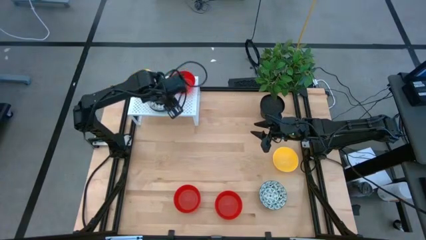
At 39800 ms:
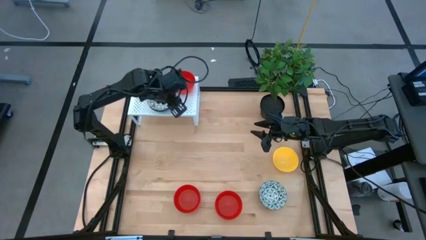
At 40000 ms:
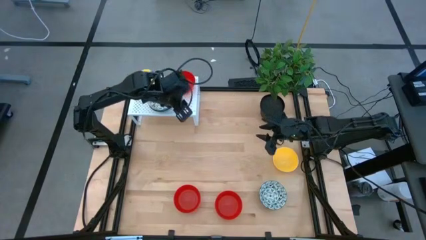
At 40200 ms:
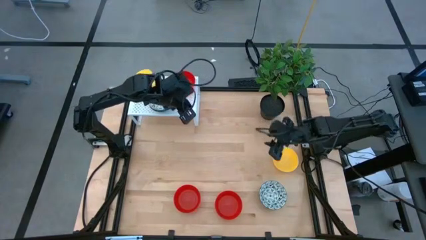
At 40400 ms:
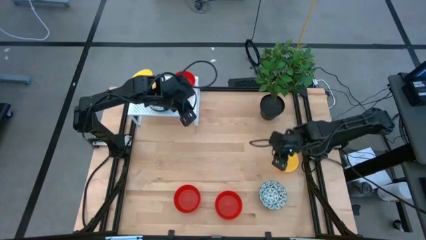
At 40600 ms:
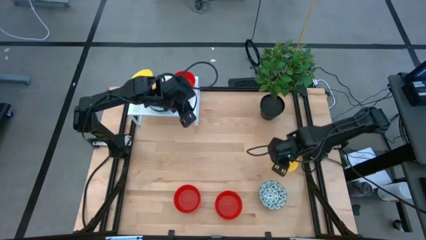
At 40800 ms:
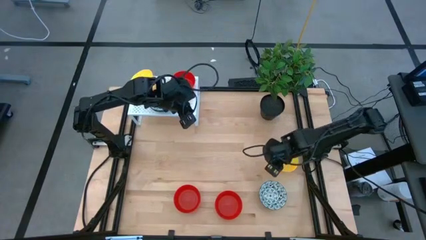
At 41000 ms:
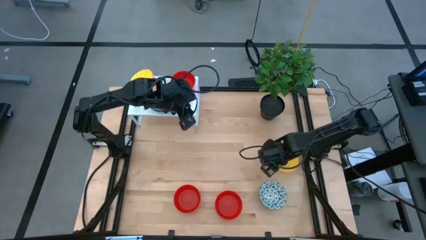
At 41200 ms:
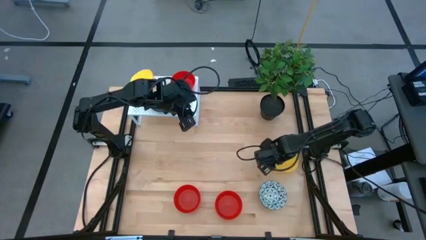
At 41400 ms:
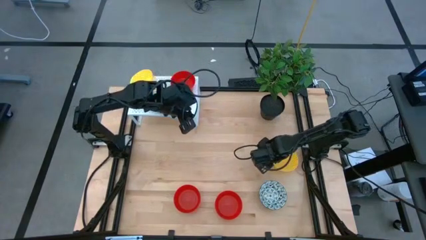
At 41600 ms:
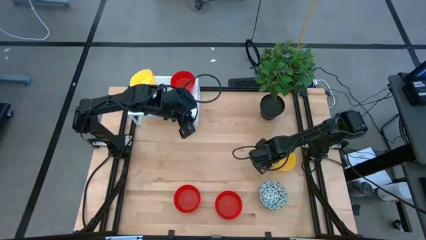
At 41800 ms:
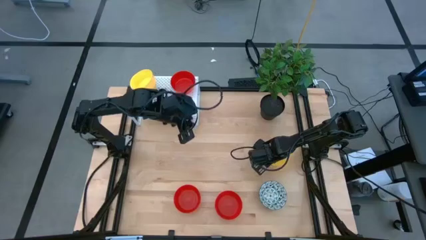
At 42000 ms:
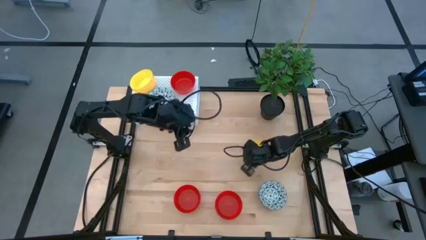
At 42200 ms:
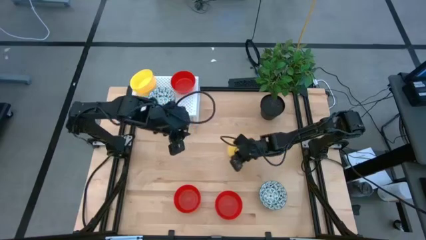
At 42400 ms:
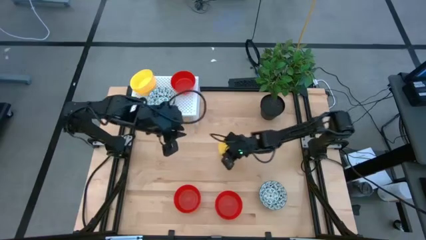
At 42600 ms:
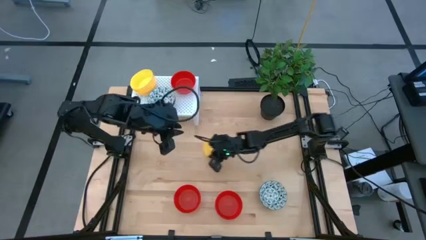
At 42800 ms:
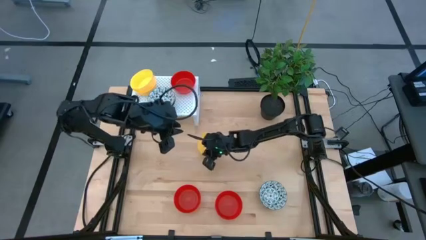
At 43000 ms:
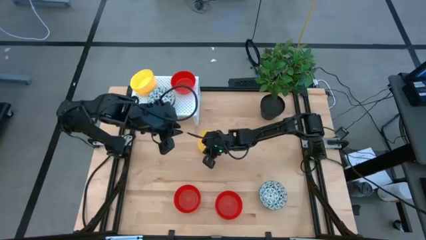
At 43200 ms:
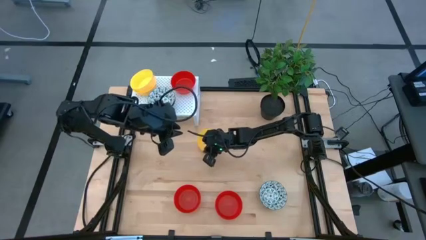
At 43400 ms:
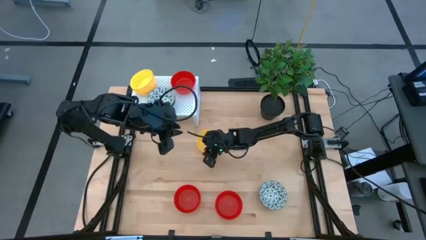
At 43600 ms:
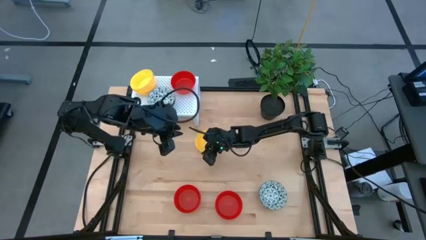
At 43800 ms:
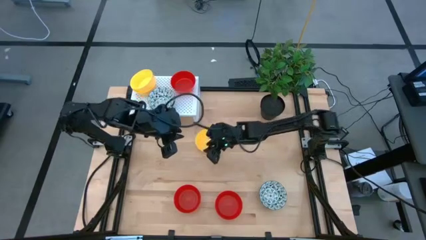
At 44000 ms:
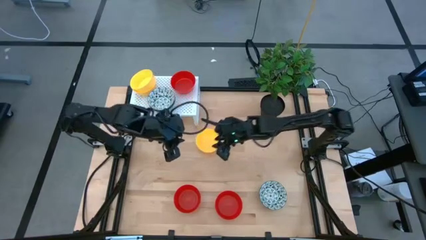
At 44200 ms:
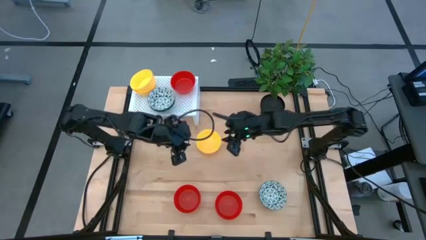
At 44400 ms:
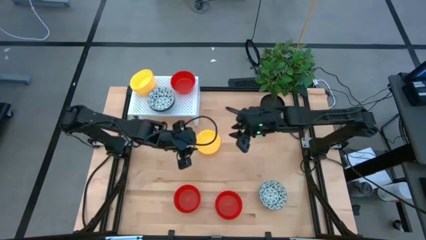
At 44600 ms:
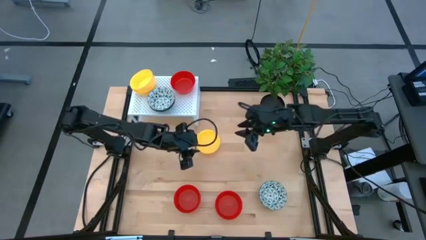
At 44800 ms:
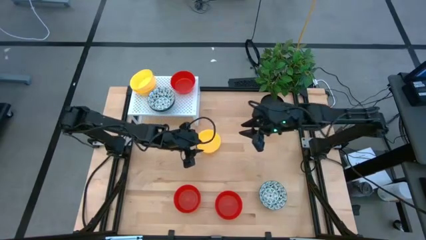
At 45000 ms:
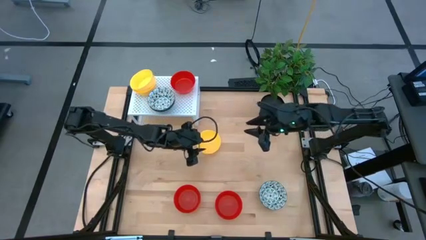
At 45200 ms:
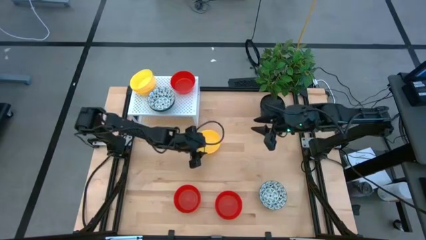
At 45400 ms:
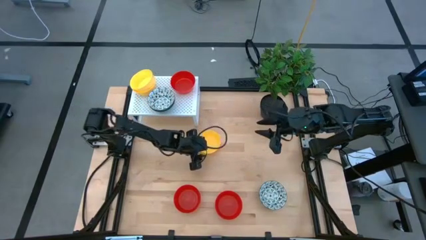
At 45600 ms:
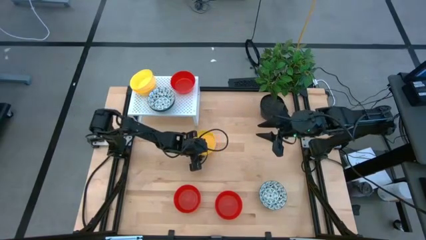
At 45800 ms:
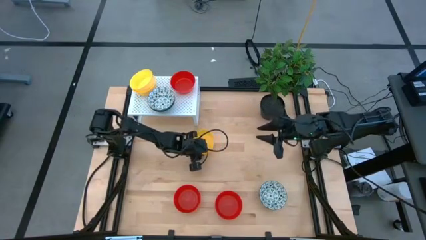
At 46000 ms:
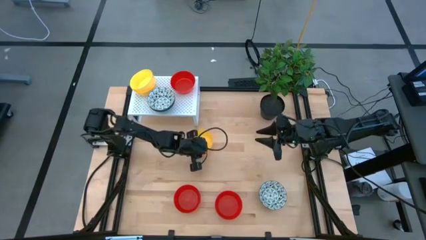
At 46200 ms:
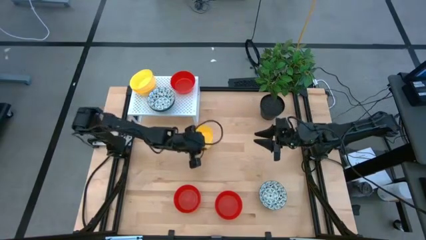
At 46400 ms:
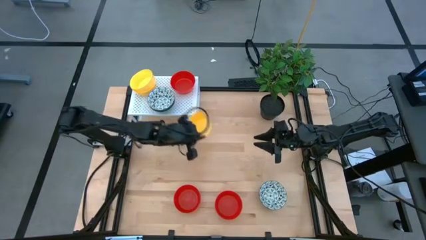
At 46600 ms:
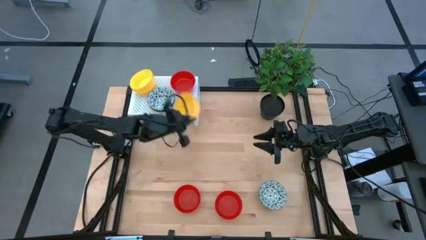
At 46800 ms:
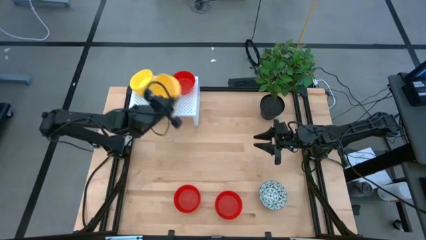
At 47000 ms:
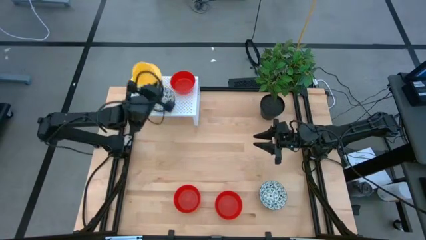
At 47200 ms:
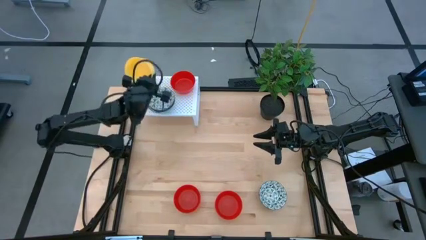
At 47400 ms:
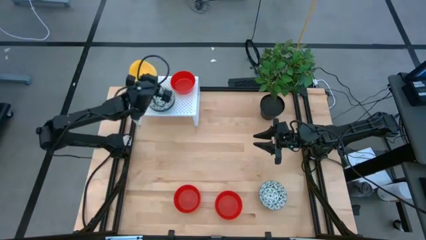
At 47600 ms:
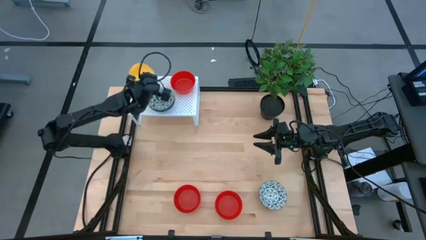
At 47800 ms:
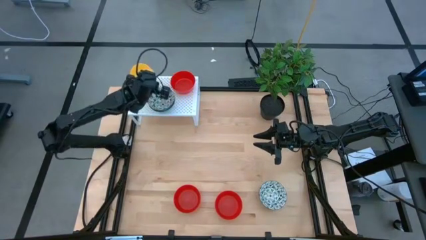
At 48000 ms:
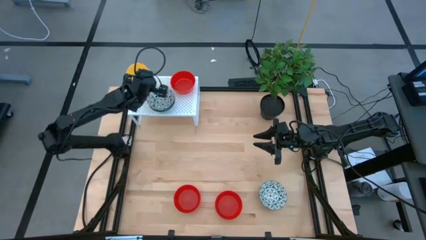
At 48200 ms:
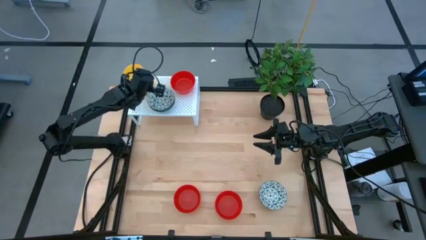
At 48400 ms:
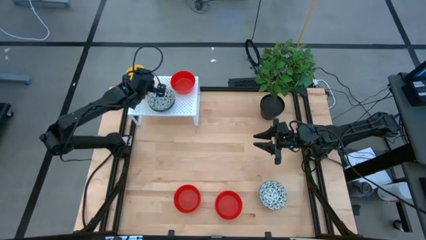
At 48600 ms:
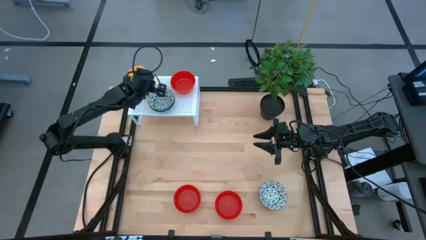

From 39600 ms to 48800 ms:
Task: Pick & Place Mini bowls
Stack the yellow bowl on top of the yellow bowls on the shelf

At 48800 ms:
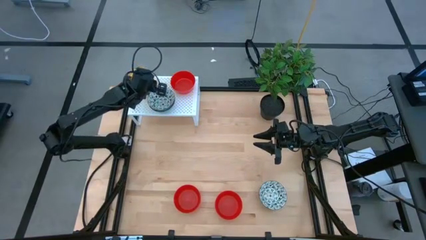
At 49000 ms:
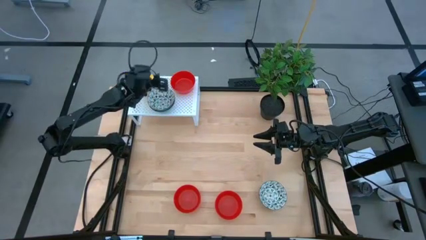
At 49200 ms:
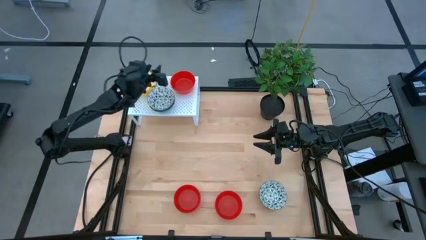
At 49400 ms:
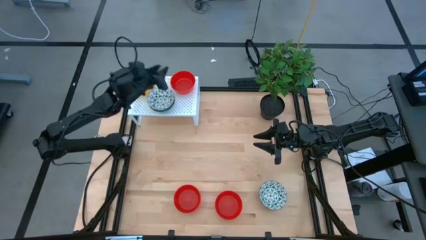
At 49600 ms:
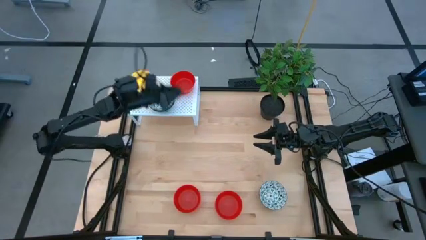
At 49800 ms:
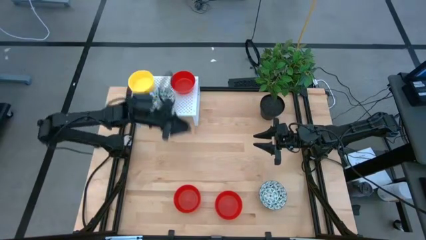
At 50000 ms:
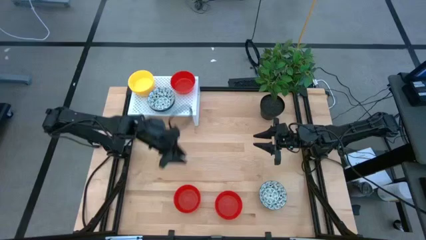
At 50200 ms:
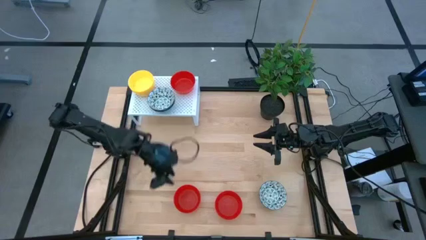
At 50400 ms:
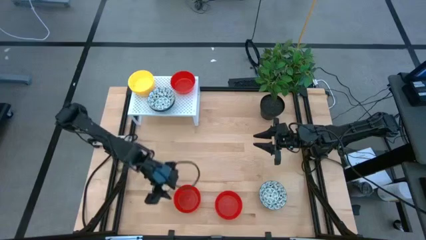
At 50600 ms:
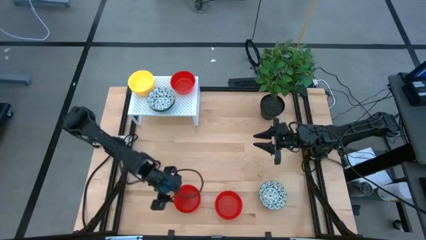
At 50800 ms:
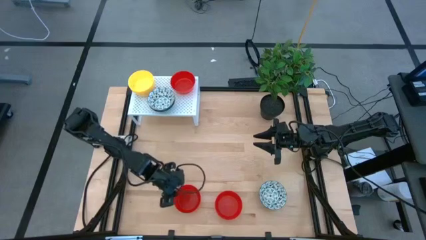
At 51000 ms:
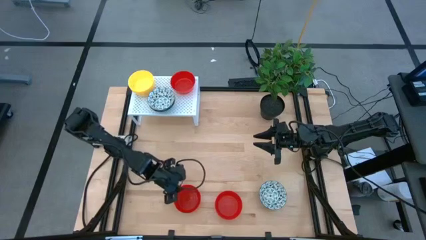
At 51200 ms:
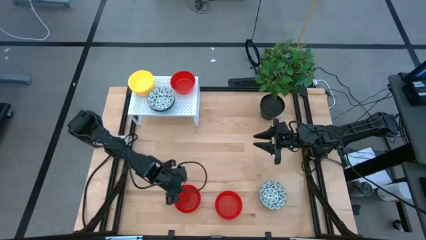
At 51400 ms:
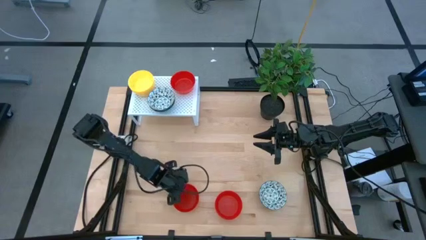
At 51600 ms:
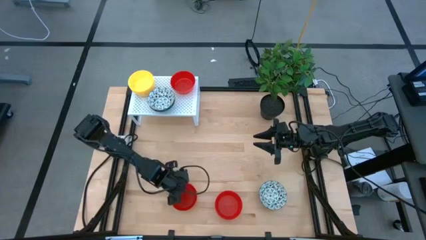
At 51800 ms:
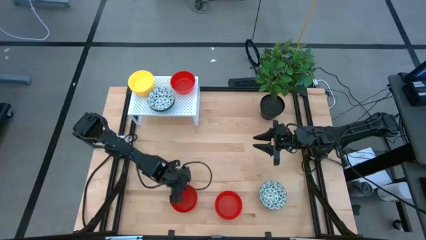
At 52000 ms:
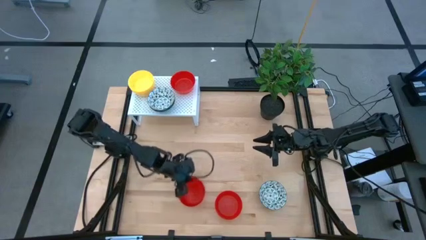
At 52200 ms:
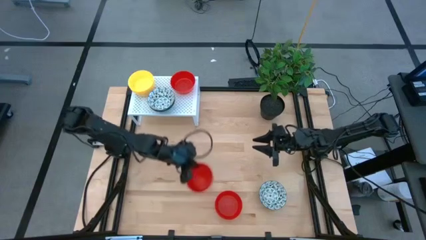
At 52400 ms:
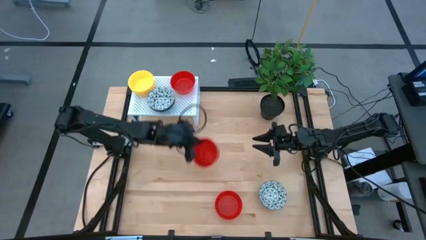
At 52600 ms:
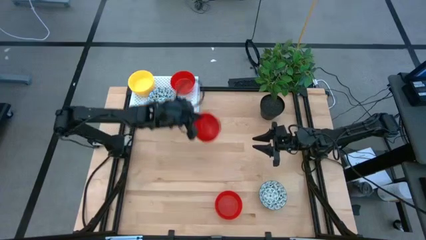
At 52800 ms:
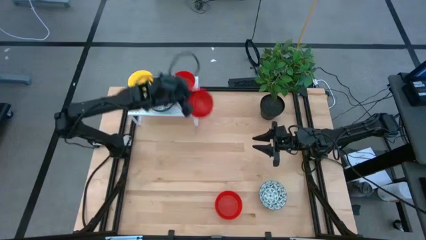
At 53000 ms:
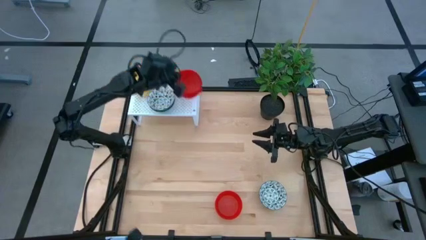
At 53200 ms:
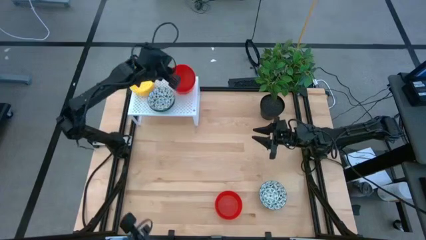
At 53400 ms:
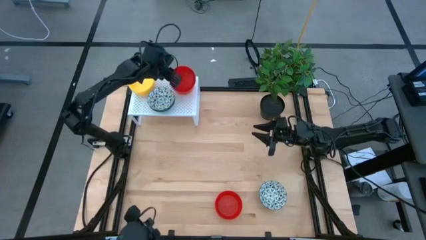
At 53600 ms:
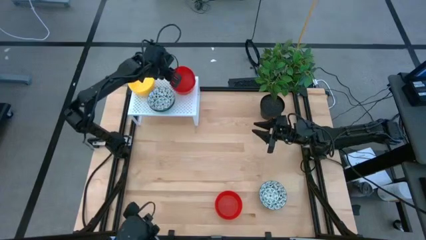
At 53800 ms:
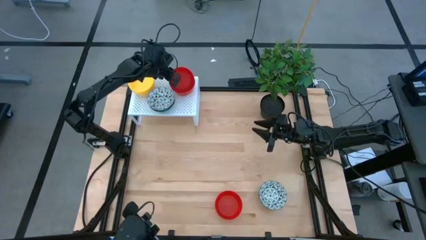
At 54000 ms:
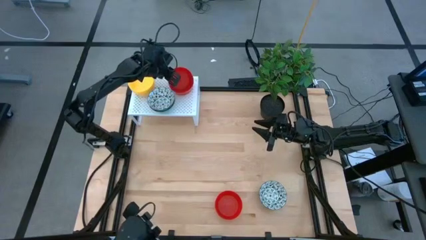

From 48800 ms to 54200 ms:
Stack the red bowl on top of the red bowl on the shelf

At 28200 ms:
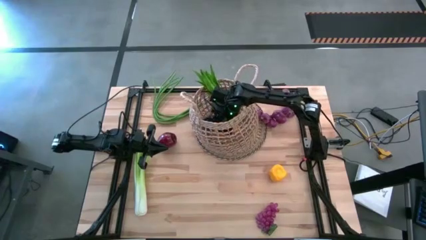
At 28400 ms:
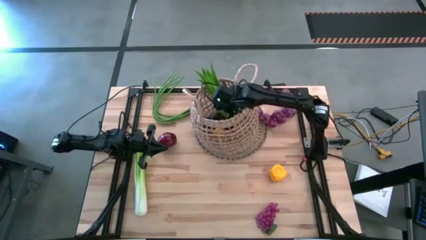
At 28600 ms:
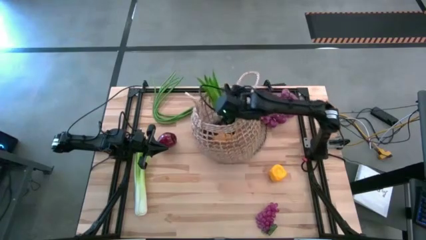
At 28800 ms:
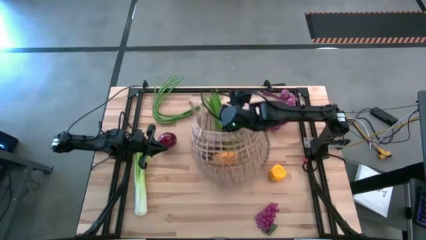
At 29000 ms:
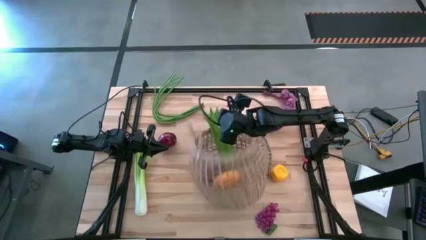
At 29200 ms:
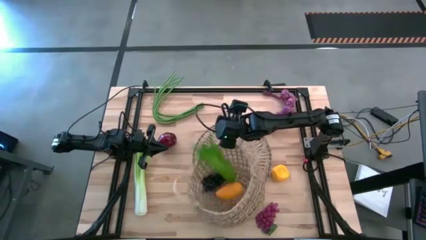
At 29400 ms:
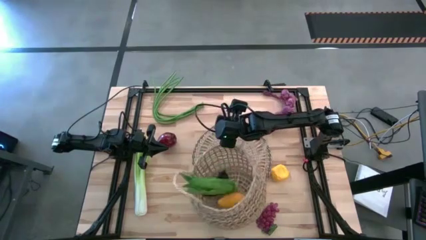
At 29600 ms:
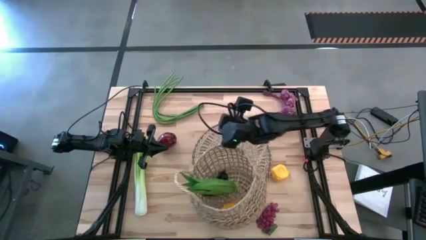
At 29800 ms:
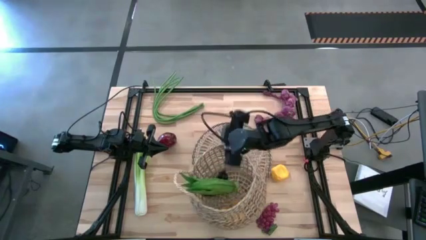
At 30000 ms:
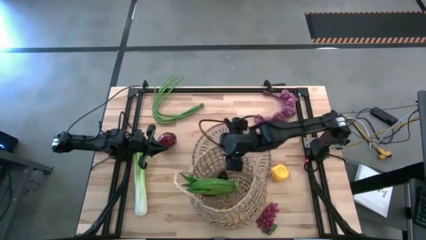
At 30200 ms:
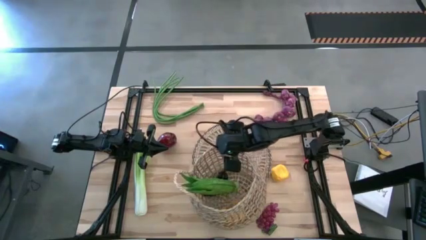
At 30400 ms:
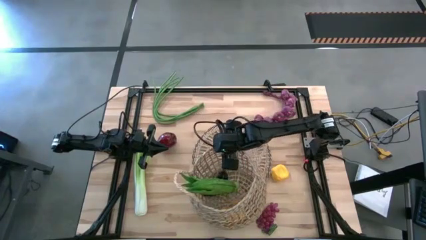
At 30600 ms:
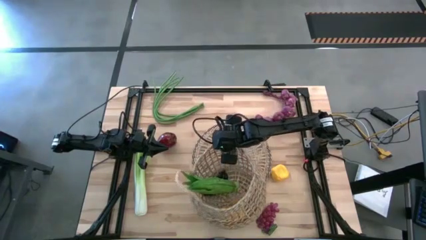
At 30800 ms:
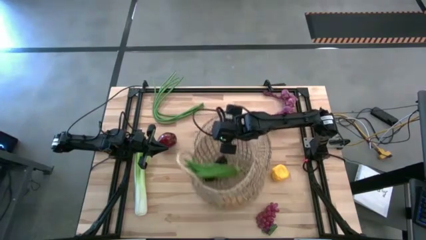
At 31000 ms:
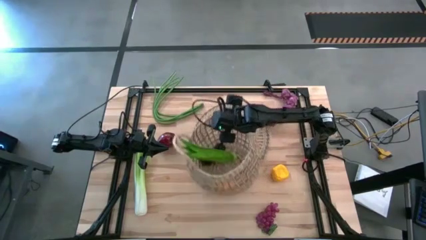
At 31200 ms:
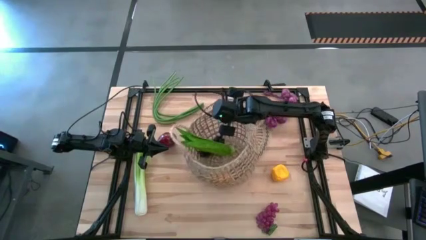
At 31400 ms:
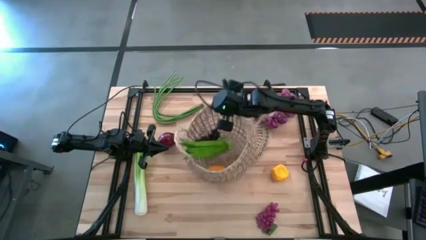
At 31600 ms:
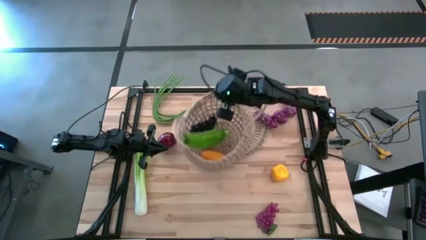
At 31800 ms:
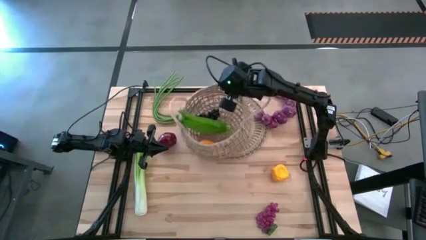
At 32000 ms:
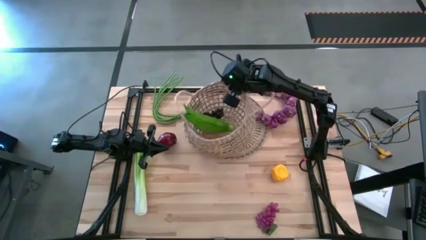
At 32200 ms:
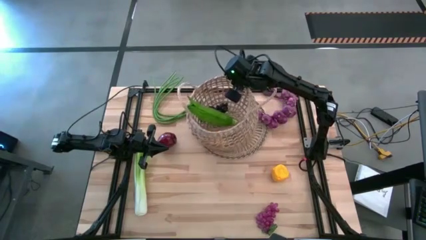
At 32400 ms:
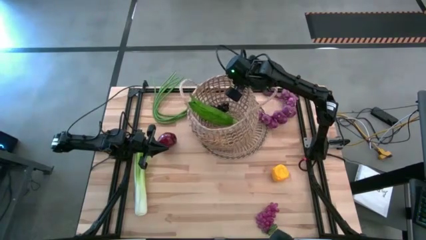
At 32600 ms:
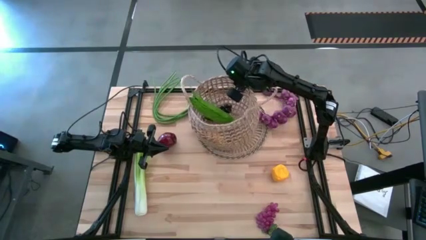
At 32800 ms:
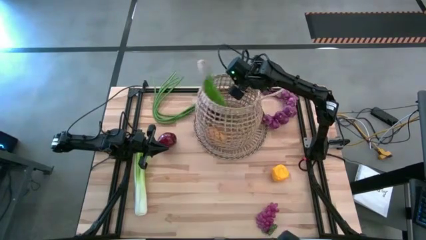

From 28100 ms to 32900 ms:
Task: Build produce basket
Adjust the light brown basket on the light brown table mat
